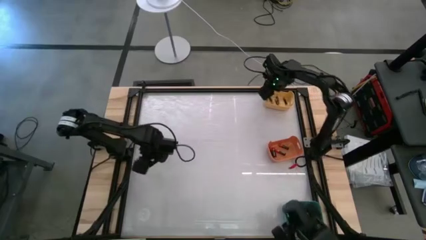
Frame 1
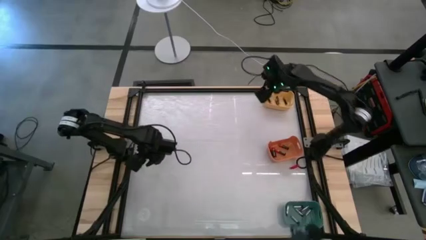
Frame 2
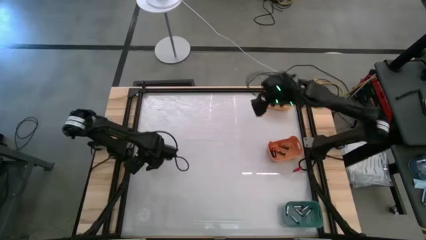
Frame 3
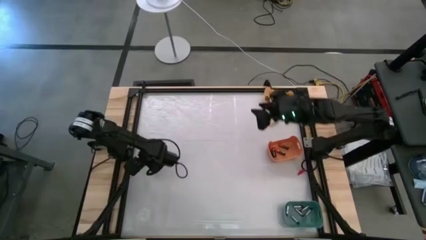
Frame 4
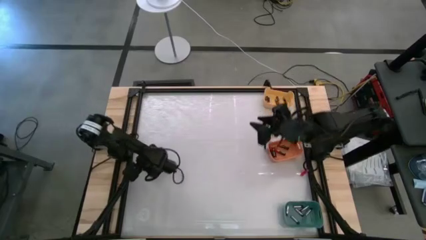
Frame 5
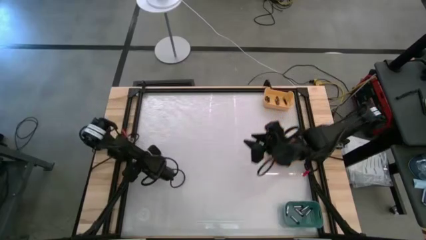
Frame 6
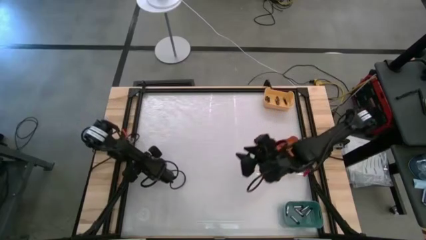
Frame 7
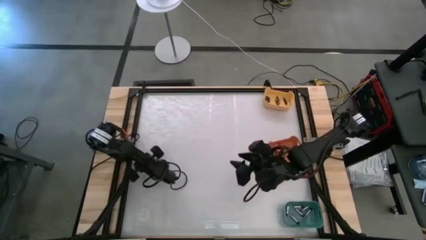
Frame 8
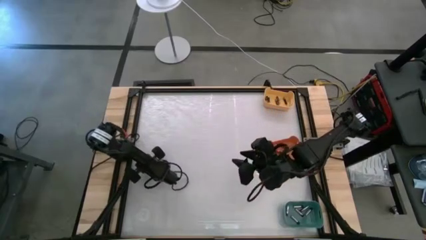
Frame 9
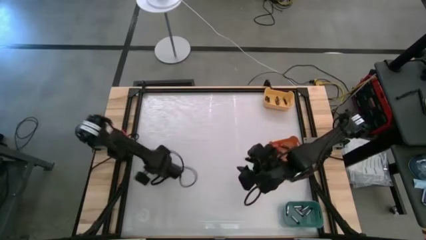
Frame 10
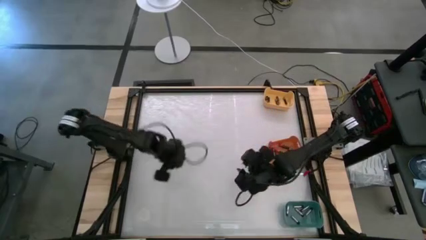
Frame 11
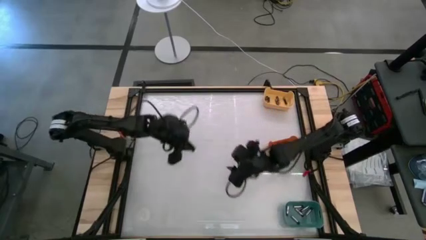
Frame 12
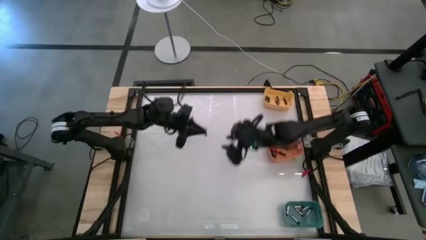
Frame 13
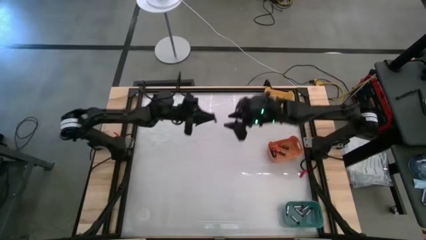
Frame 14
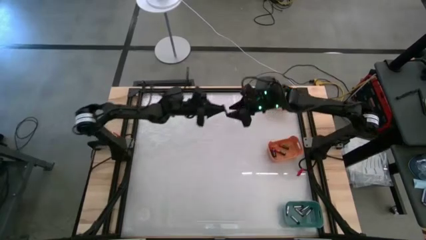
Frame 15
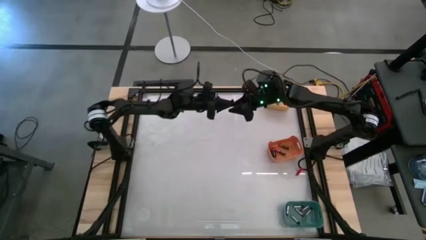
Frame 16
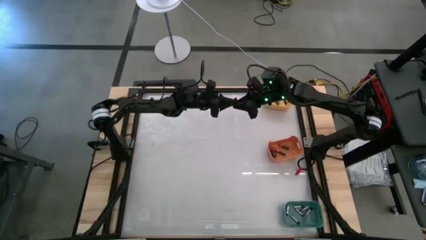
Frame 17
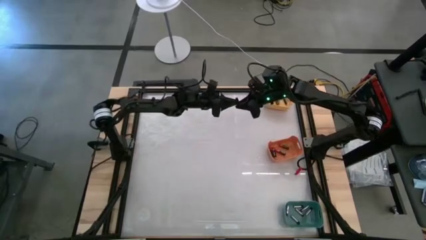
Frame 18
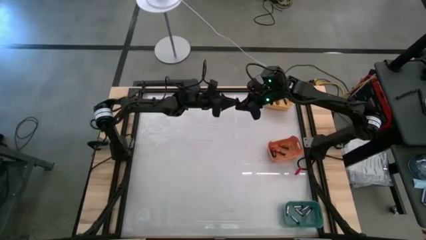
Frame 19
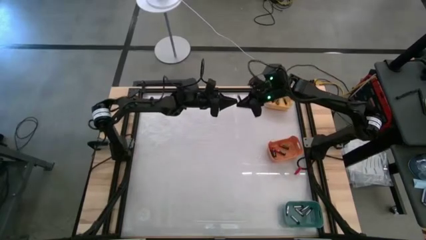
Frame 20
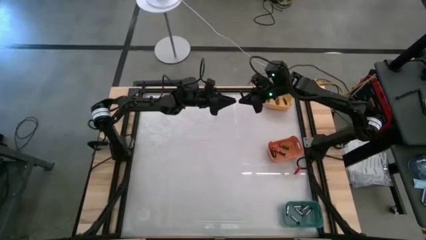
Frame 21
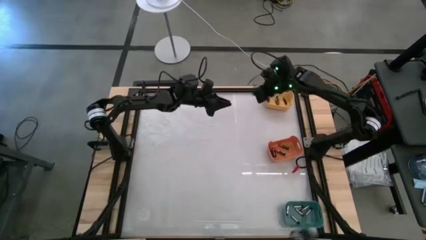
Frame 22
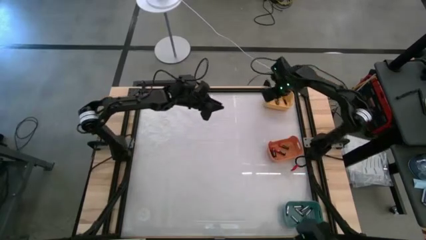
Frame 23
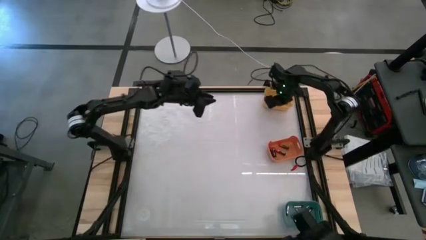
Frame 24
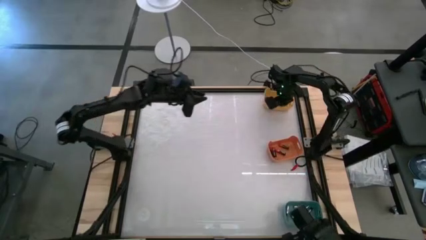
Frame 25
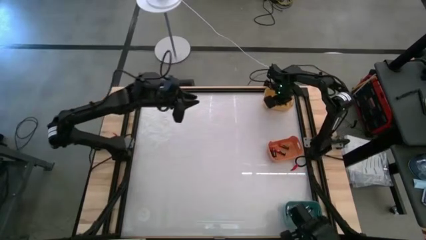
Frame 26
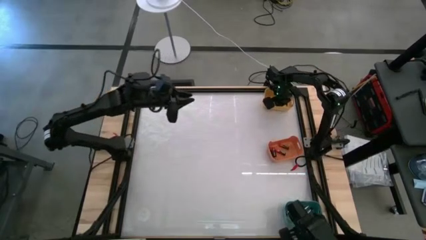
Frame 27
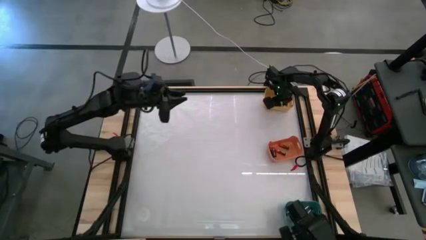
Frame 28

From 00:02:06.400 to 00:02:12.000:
Task: Sort batteries
Put the black-orange battery into the yellow bin

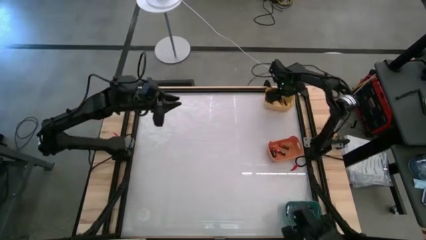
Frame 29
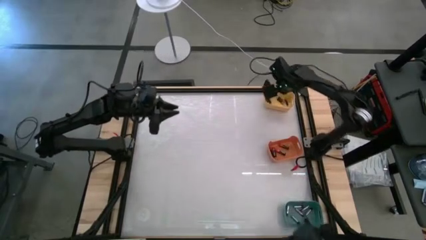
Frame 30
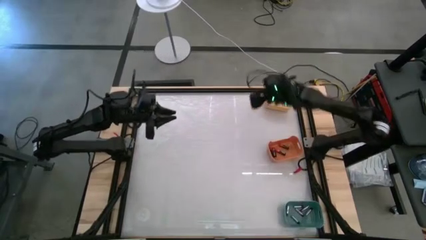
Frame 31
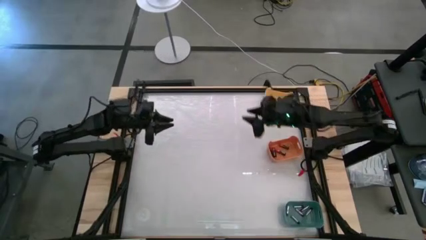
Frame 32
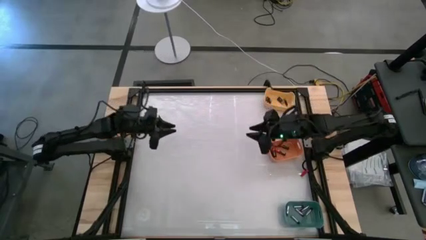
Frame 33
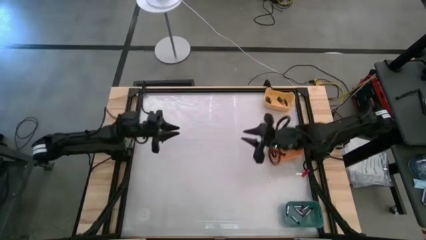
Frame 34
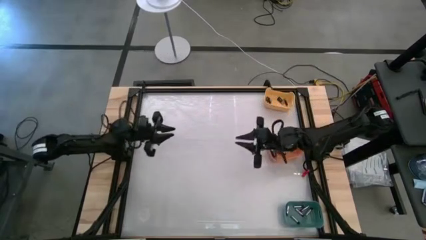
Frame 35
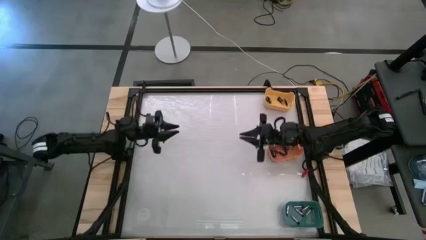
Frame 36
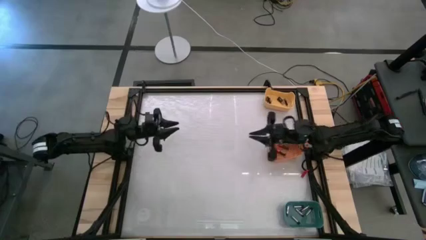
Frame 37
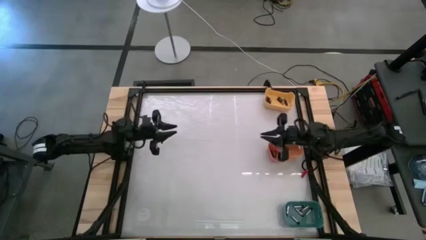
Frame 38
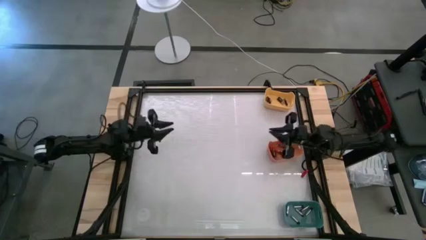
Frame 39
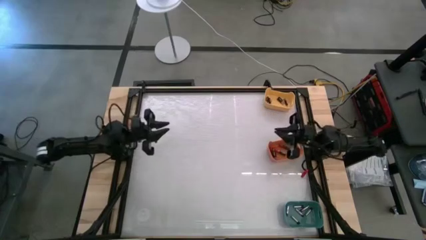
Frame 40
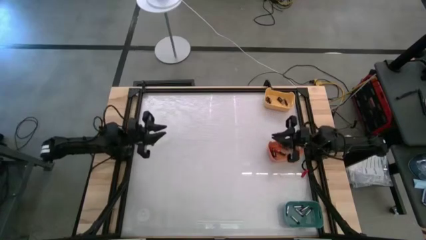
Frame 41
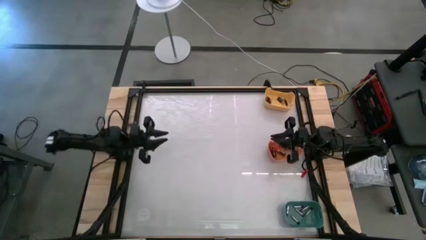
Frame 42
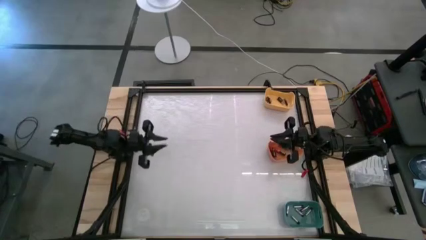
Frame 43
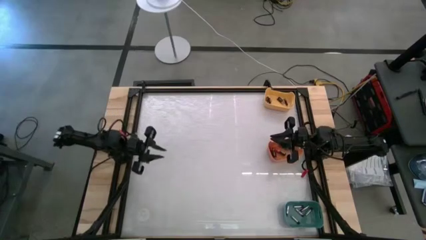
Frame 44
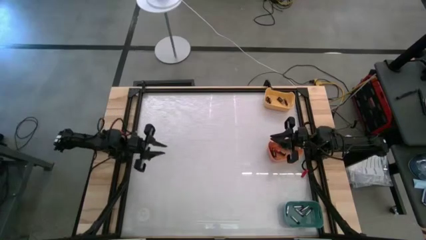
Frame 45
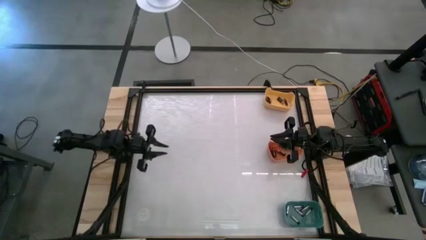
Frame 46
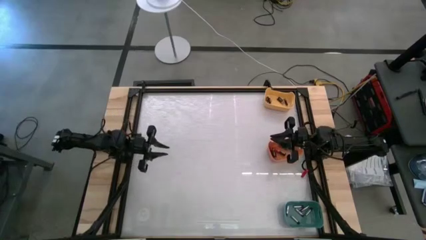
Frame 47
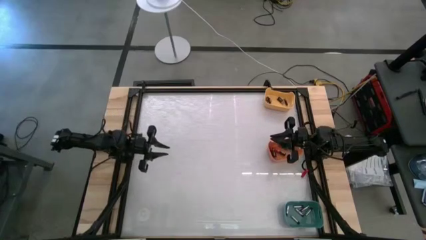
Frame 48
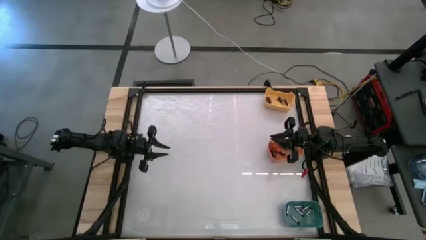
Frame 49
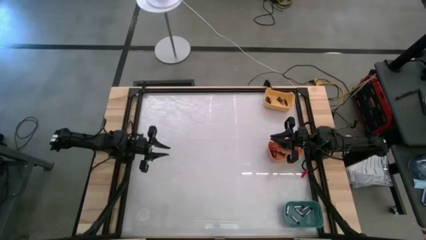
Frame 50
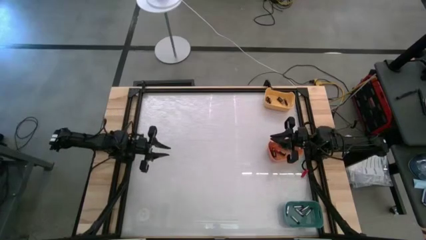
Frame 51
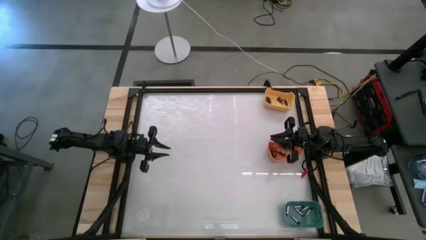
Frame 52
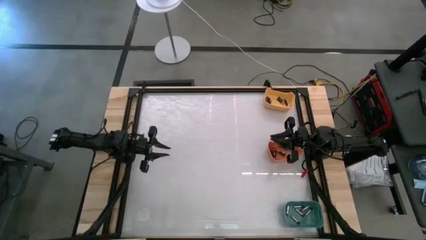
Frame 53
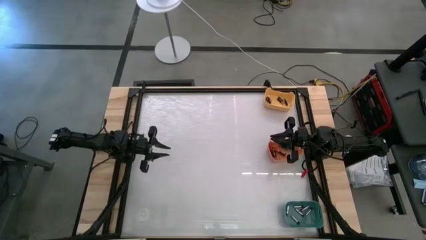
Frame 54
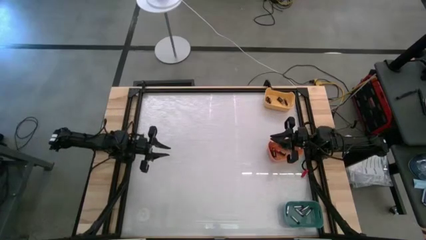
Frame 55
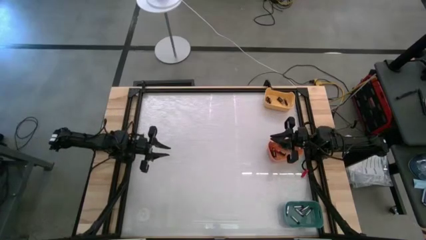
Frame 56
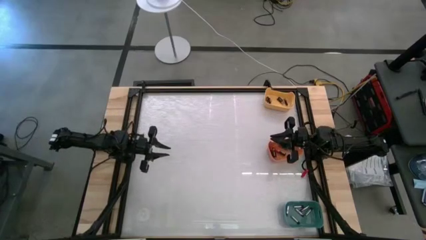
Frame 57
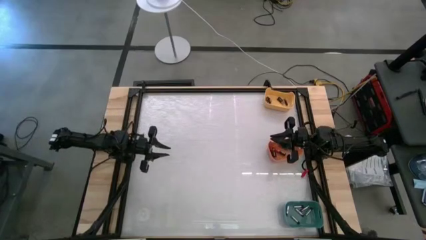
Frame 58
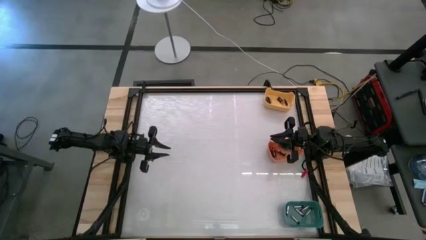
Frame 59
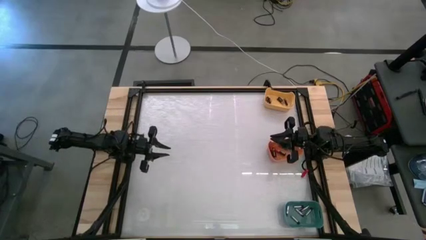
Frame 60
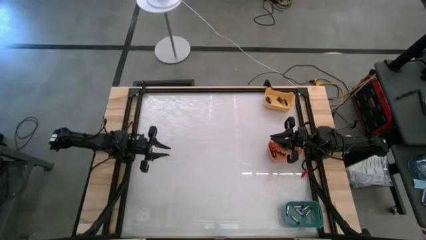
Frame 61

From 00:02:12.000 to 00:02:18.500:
Return to Home Position

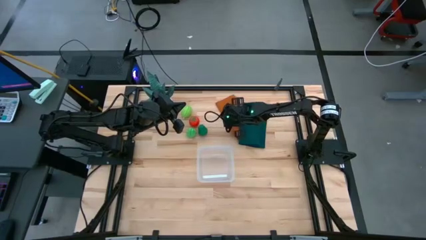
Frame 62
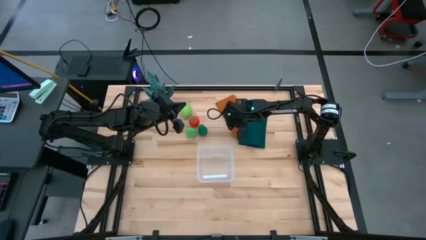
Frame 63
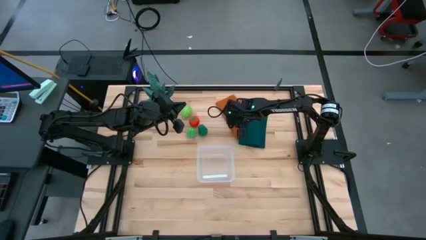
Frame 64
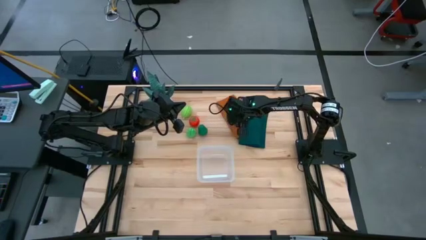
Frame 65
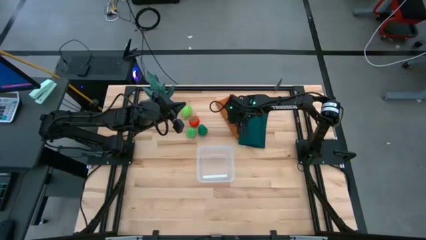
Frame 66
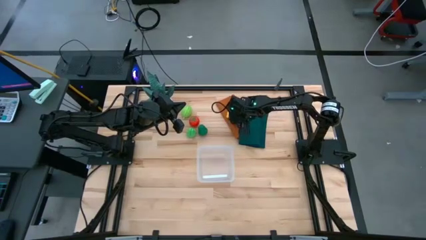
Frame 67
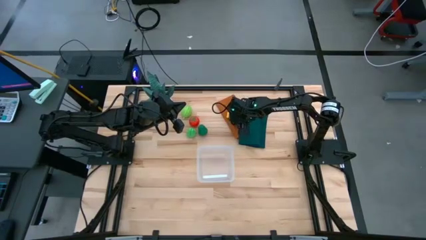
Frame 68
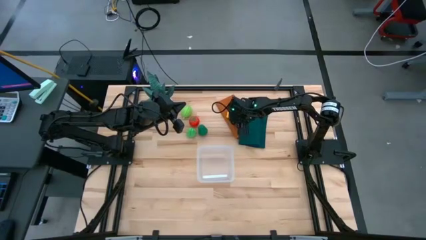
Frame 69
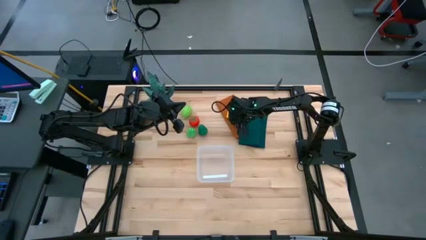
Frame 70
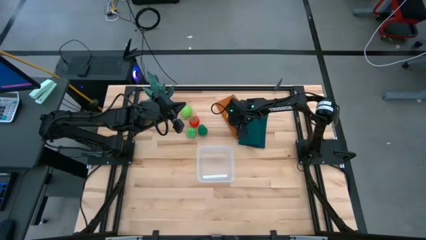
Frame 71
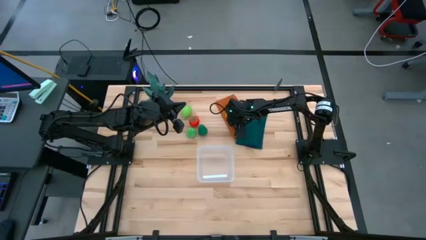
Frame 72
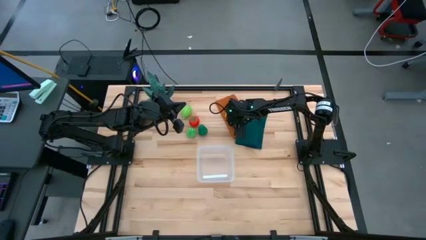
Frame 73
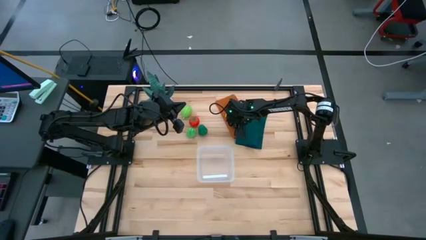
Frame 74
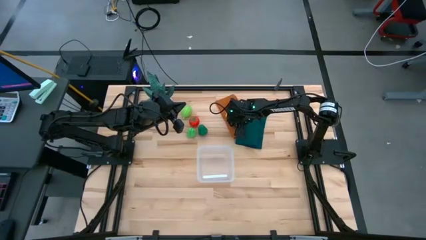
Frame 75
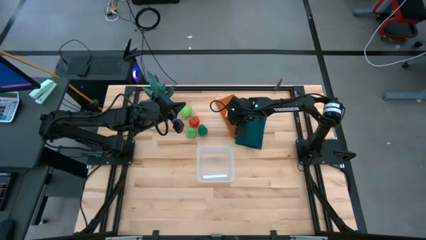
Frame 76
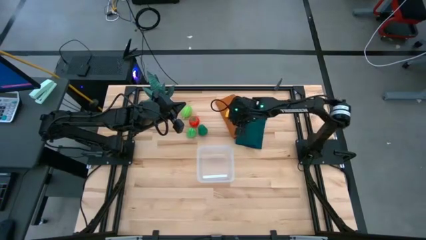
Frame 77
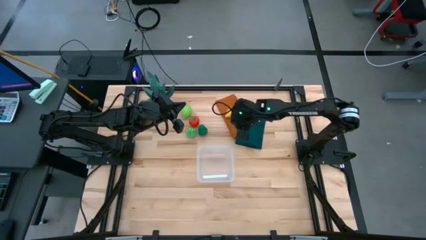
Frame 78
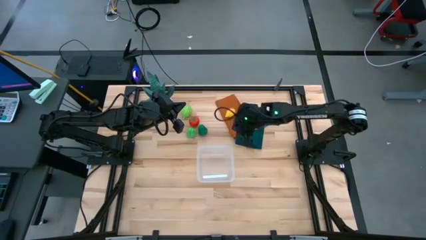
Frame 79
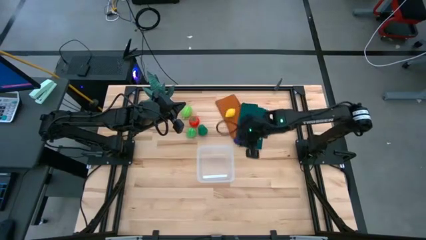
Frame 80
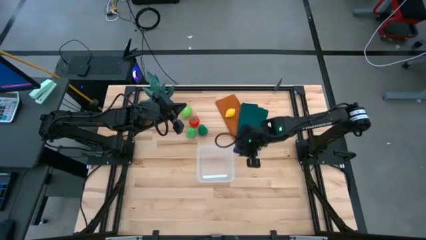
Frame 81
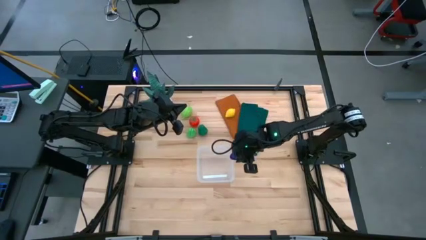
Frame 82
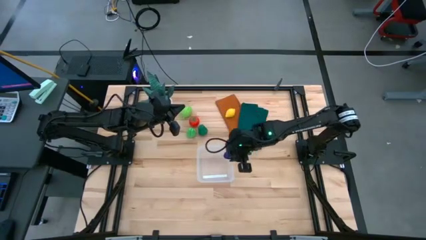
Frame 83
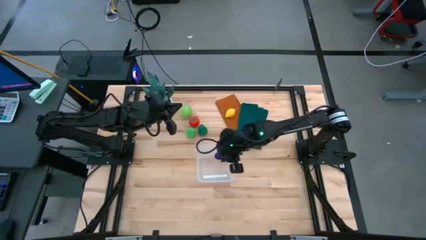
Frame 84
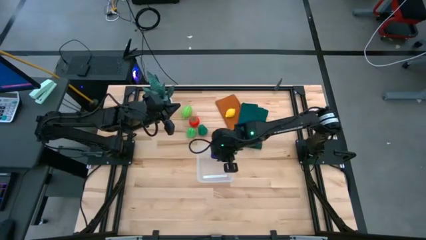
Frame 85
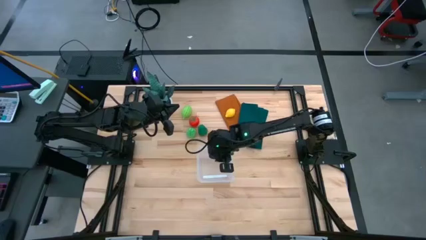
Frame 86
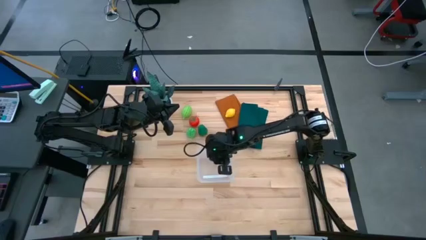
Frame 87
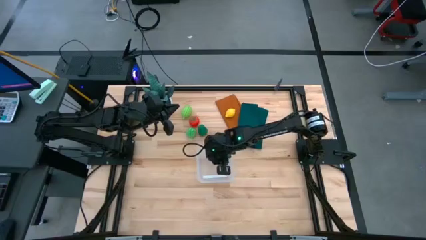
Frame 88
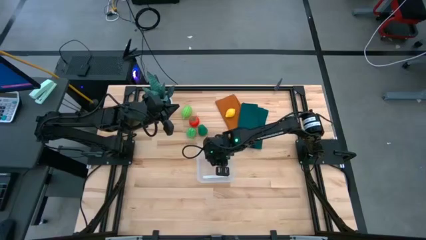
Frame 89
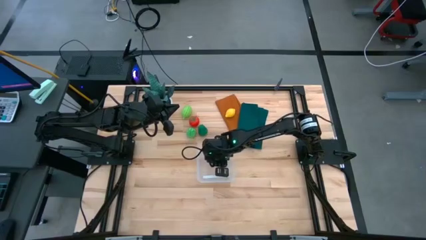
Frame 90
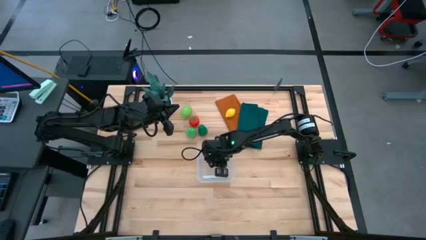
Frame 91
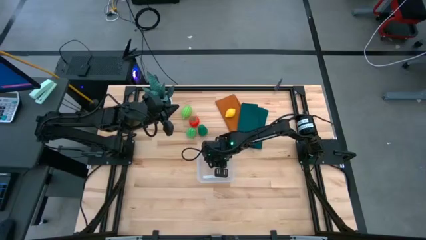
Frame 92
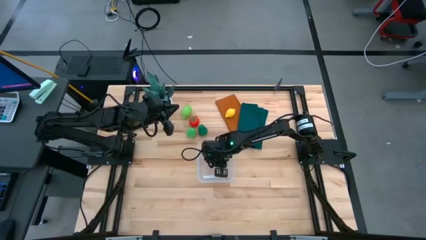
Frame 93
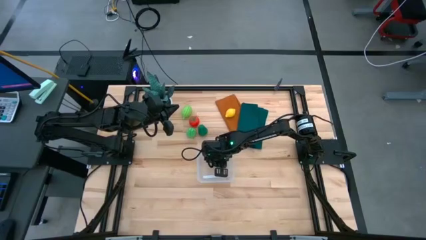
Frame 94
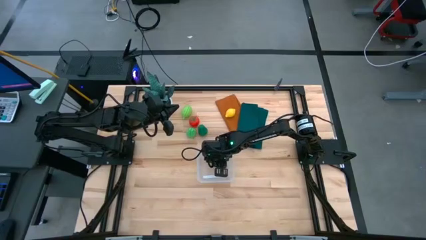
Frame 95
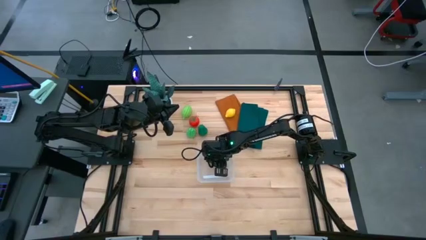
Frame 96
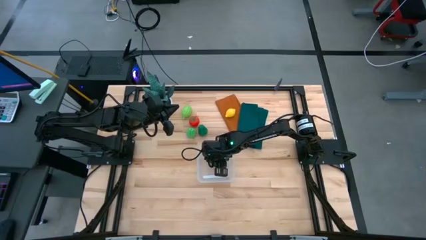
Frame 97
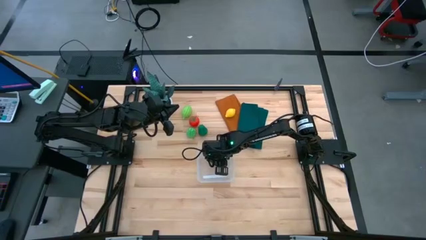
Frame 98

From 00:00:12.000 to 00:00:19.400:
Task: Pick and placing Produce into tupperware
Put the violet eggplant into the transparent container
